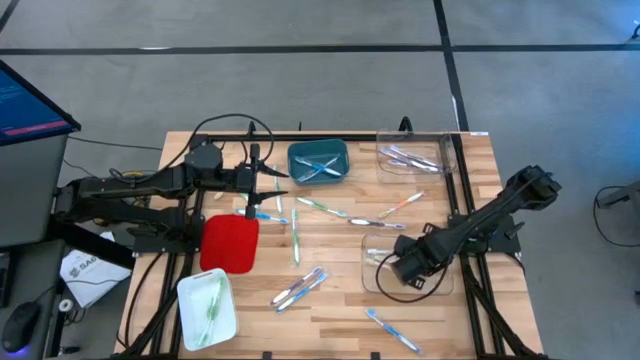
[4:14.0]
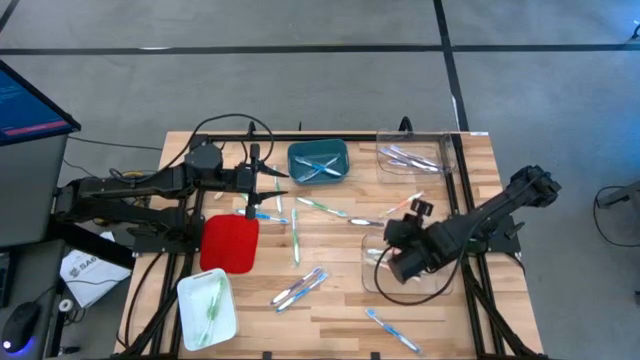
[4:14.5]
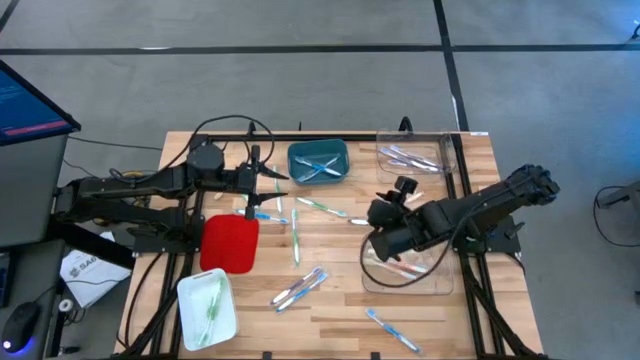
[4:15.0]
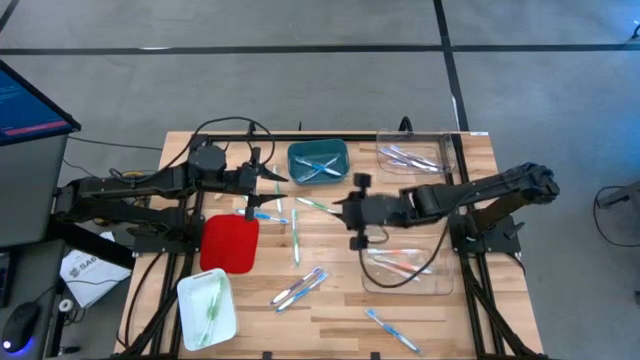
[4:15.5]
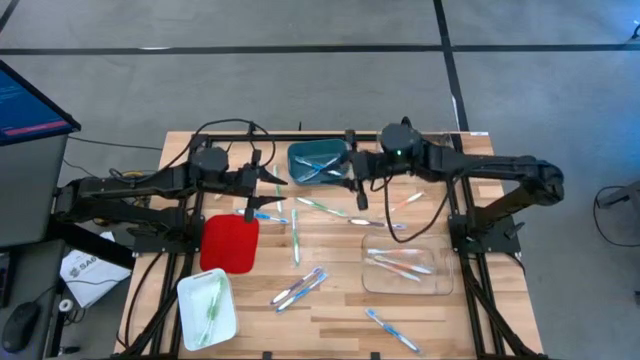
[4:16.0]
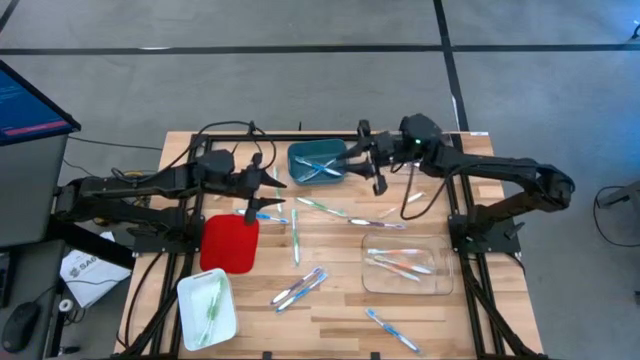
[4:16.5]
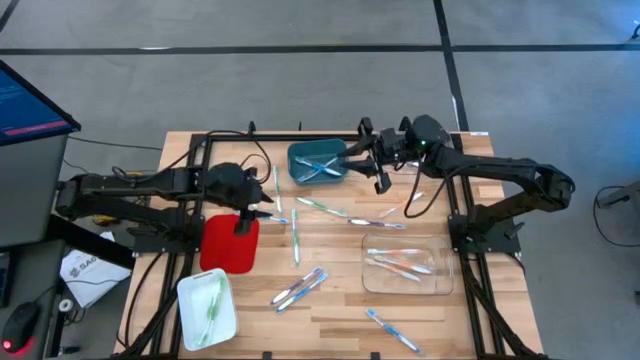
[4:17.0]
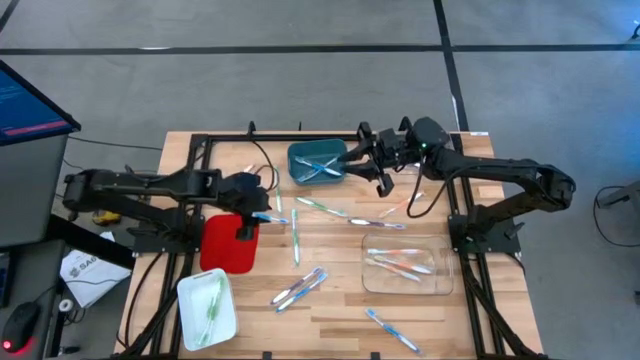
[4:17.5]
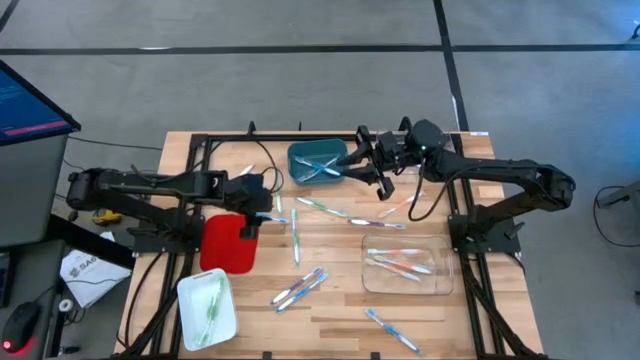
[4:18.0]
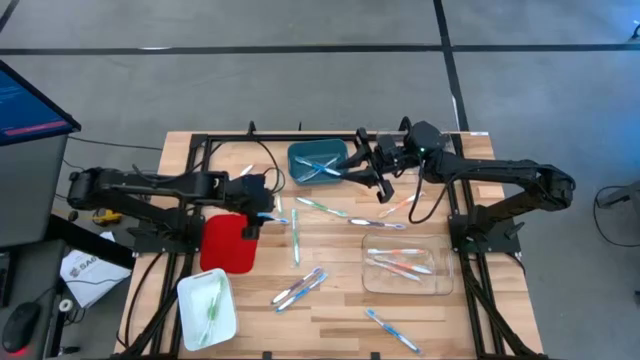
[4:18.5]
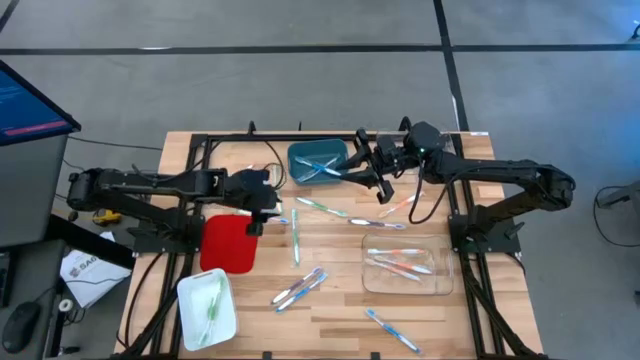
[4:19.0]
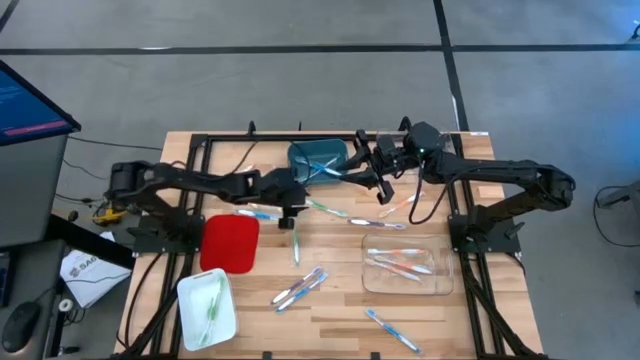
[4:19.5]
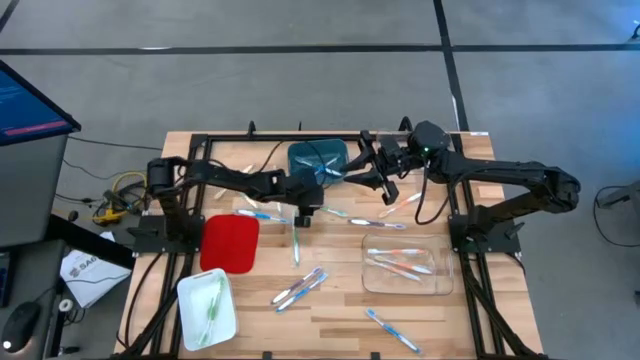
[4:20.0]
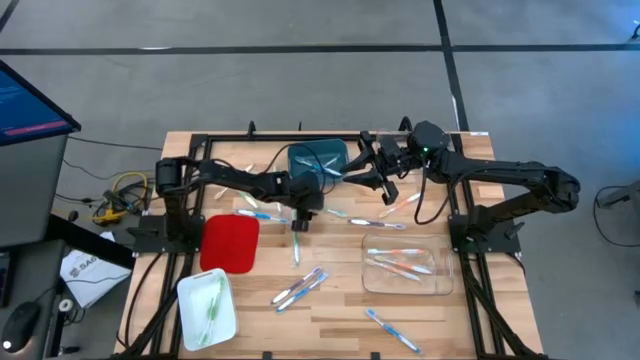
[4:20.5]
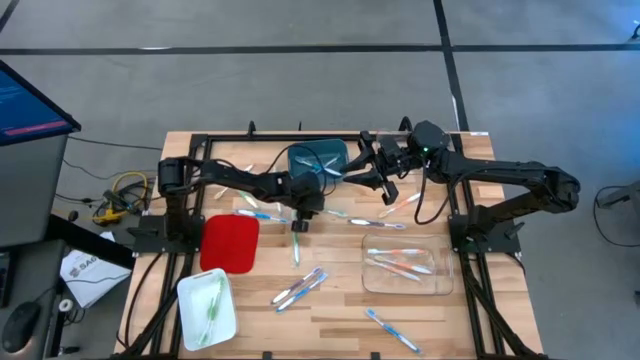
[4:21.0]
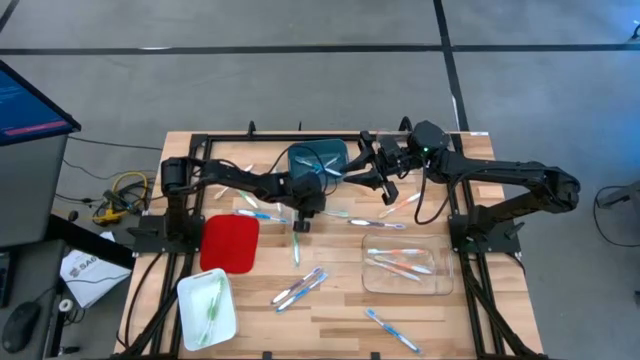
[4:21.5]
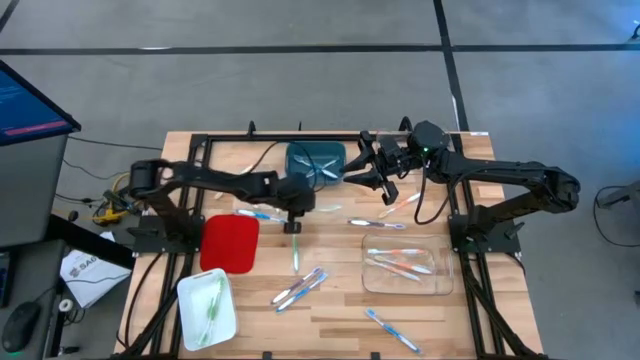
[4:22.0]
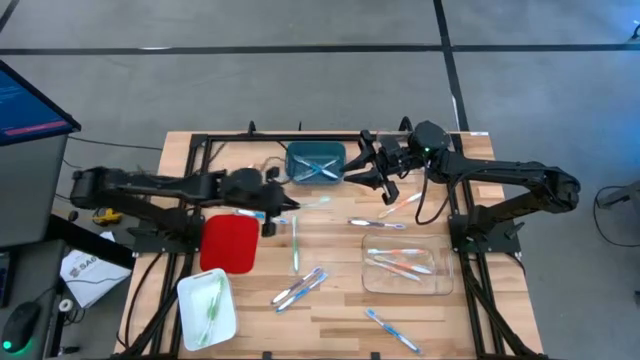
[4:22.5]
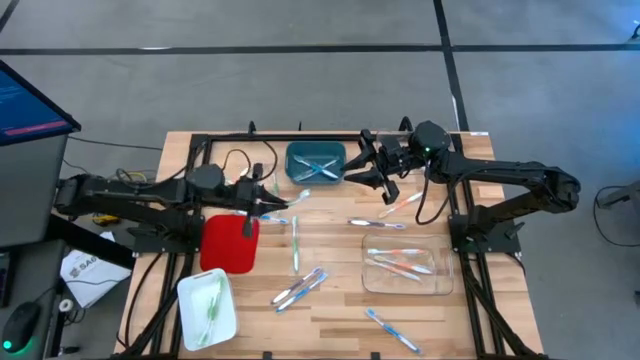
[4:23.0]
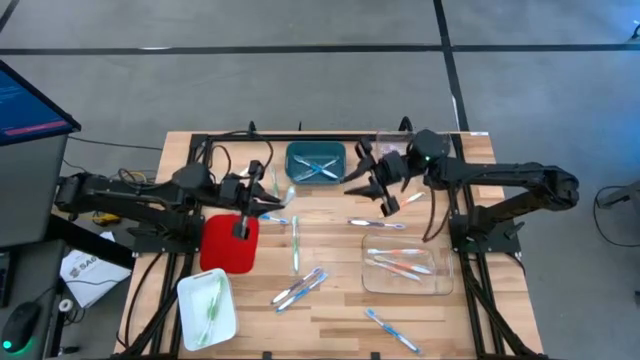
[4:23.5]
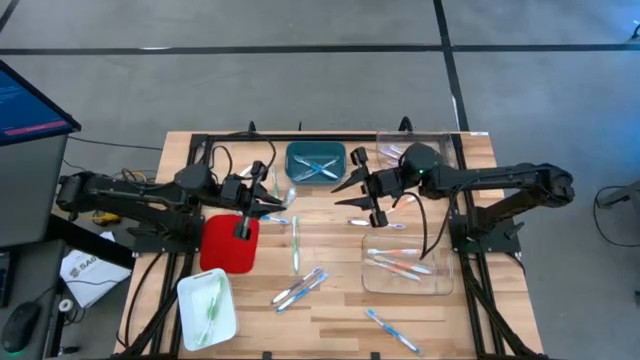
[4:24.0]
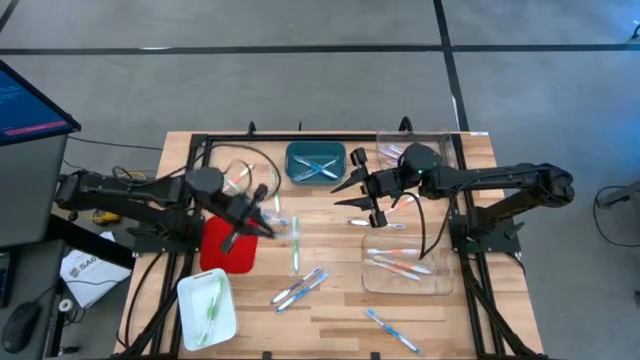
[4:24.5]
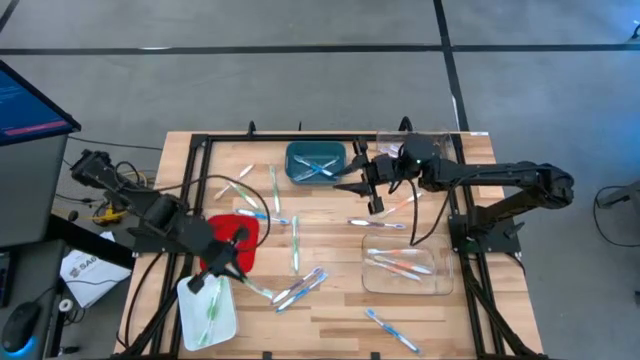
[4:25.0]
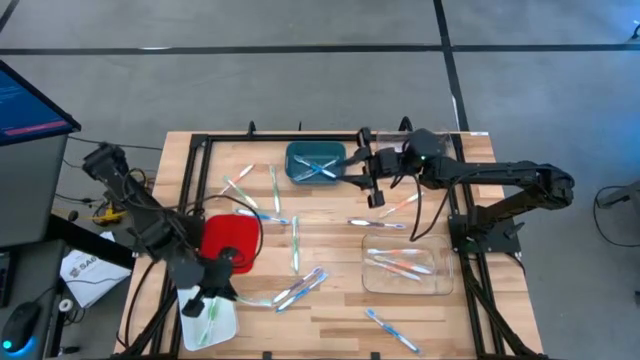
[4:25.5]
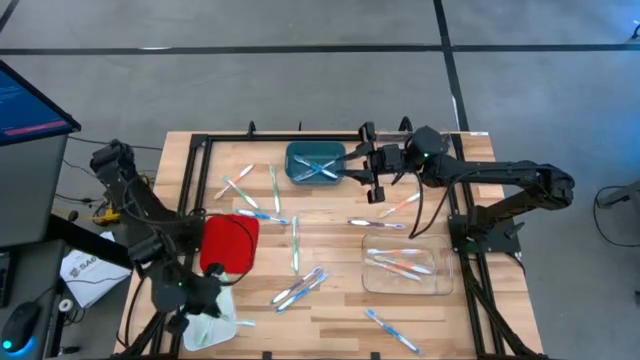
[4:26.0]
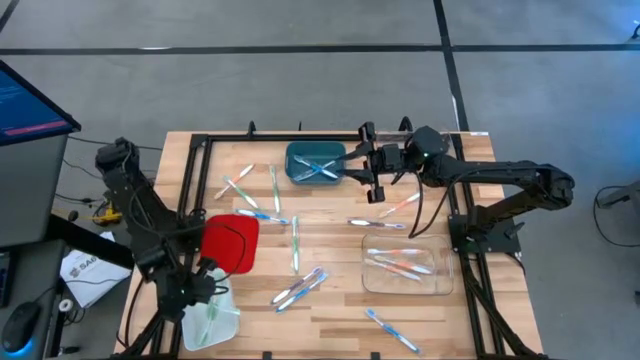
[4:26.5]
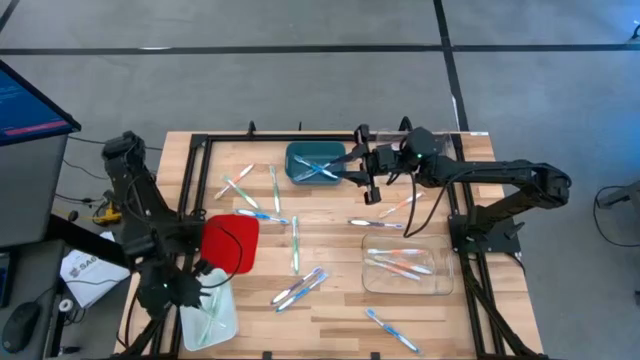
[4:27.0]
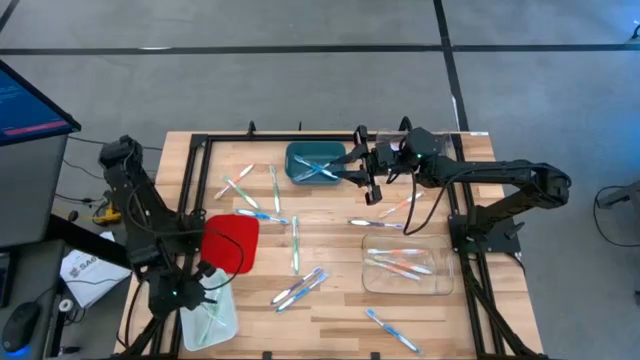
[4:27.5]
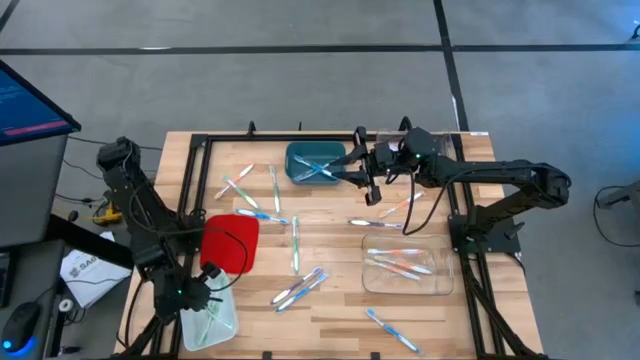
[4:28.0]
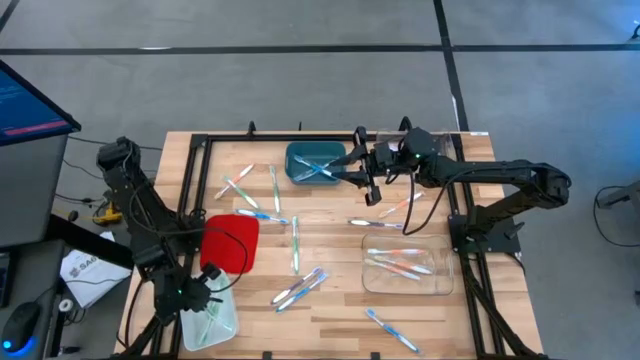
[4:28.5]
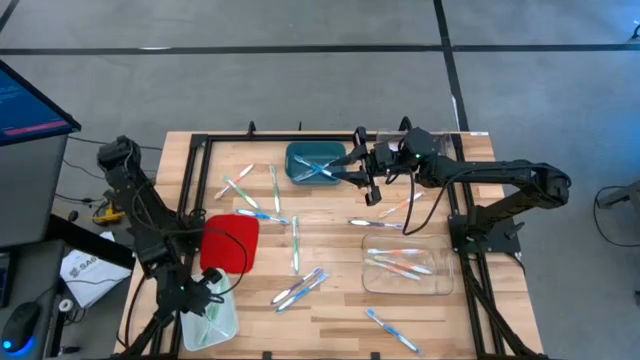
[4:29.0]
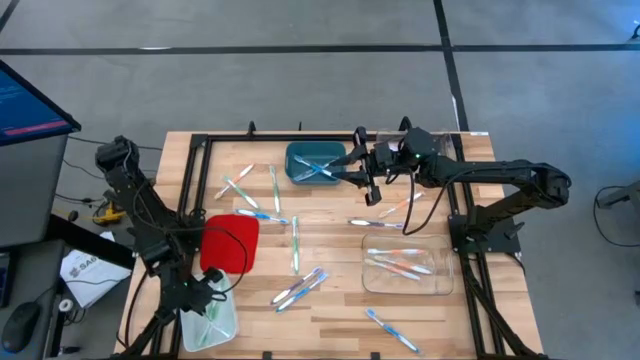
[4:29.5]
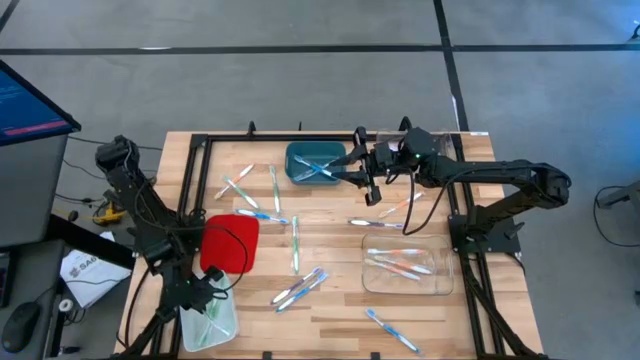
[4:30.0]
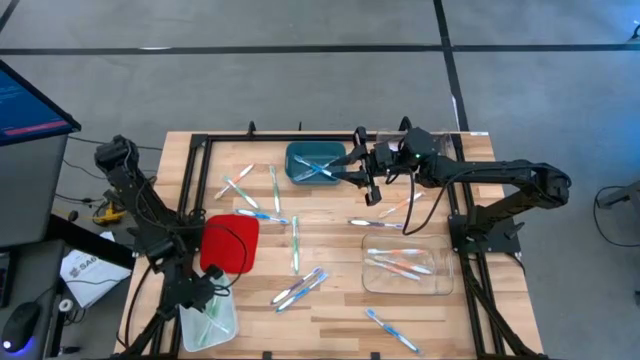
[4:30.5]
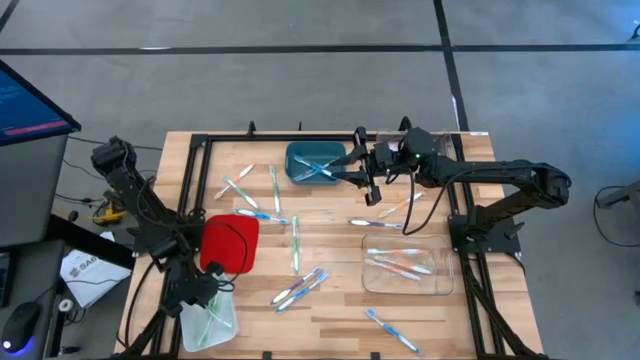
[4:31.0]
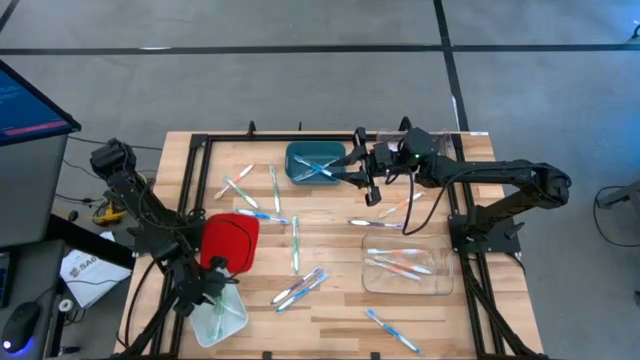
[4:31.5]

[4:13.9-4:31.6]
Task: Pick & Place Toothbrushes
Put the green toothbrush into the white bin

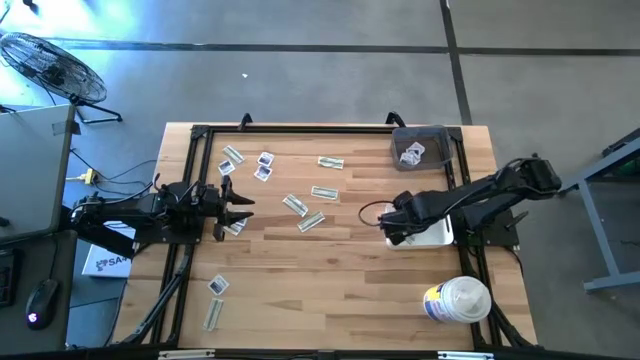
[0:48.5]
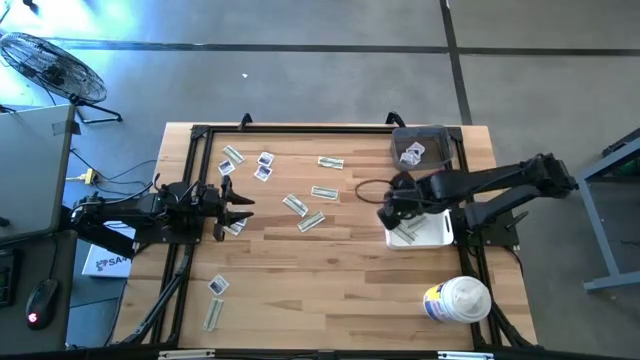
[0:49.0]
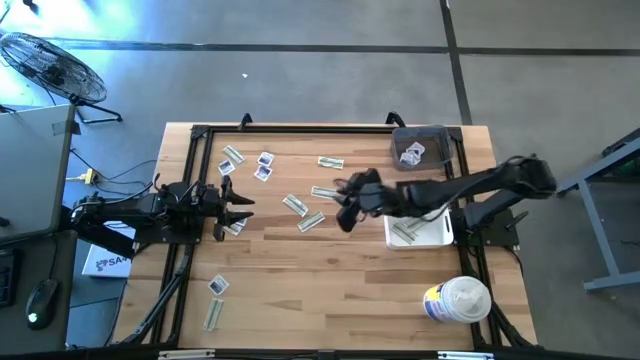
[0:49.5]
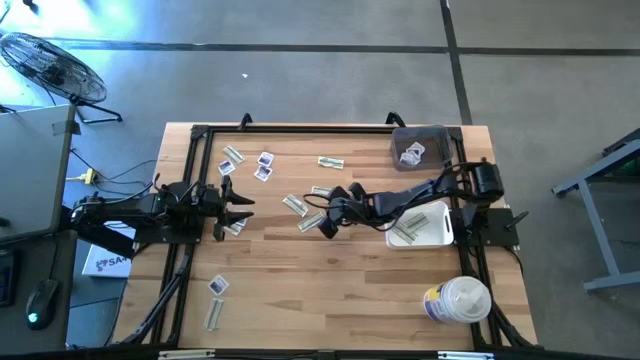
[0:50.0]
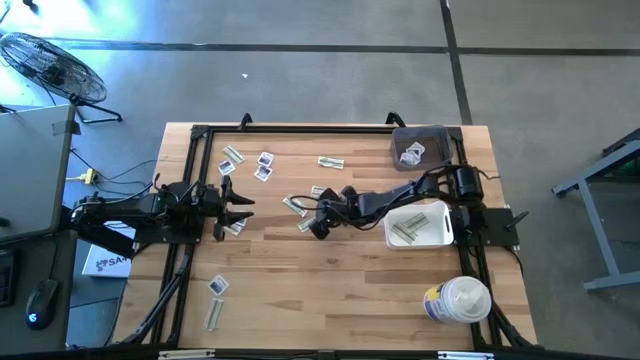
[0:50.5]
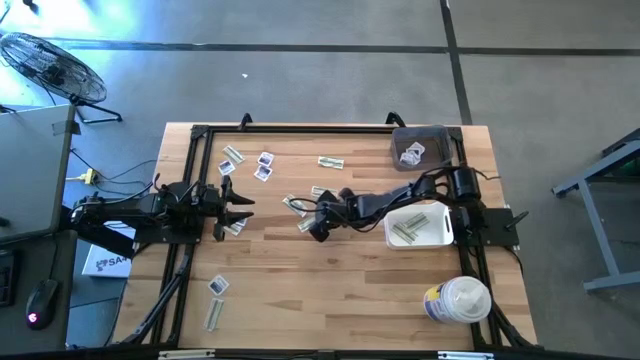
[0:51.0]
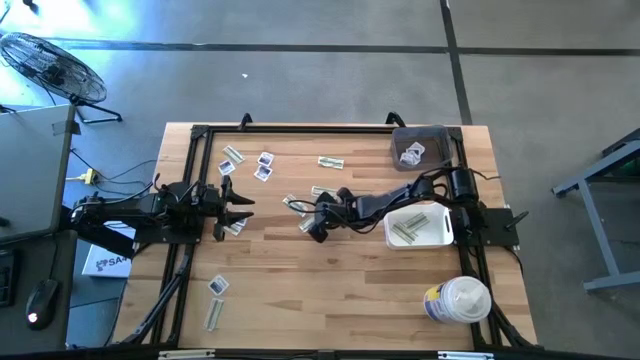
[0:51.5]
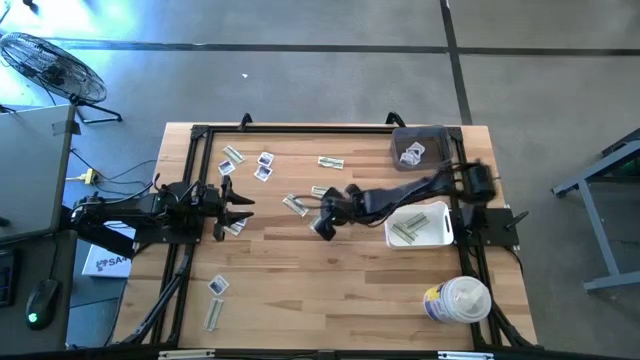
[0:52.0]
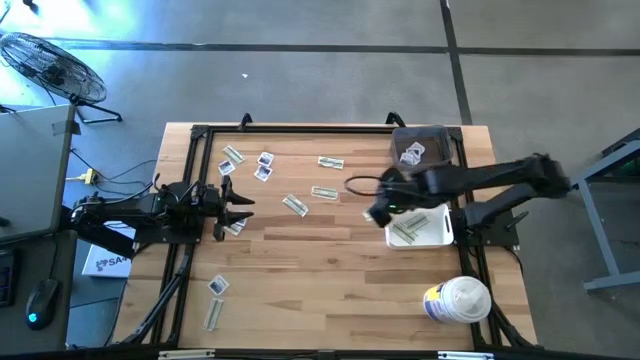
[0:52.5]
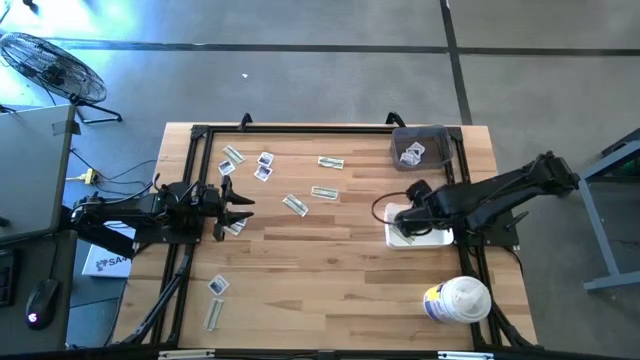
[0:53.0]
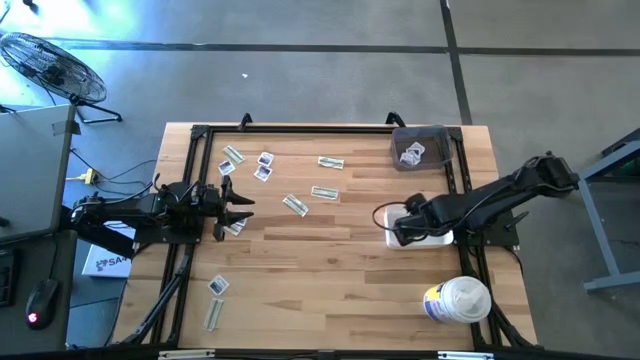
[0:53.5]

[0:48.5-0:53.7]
Task: Pick & Place First Aid Supplies
Put the bandage into the white bin
